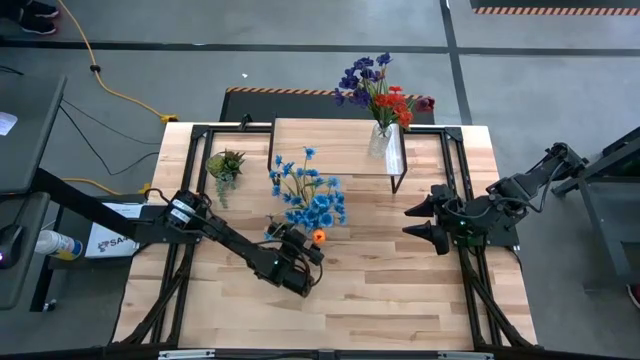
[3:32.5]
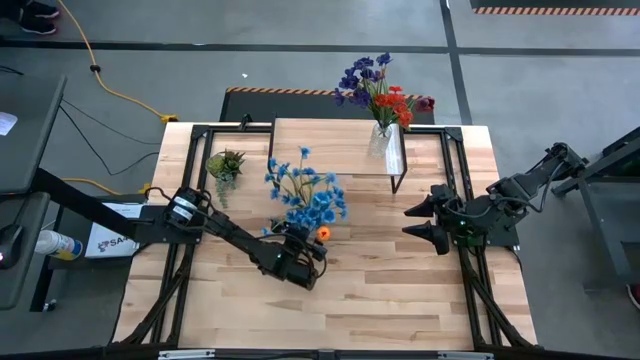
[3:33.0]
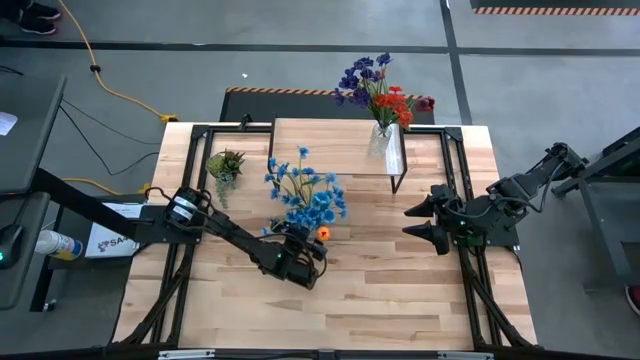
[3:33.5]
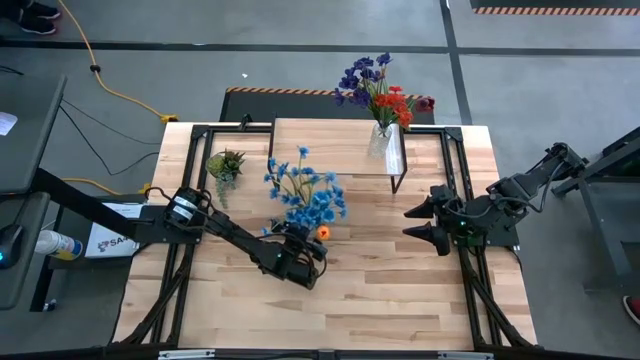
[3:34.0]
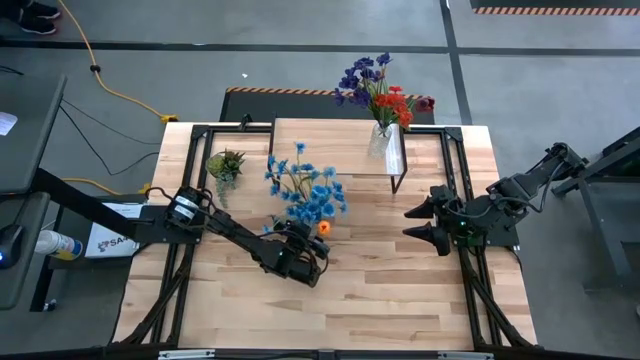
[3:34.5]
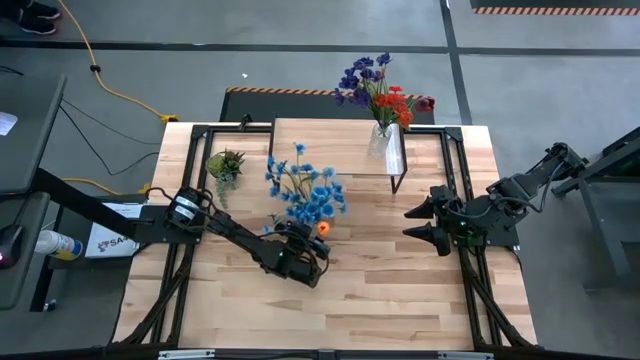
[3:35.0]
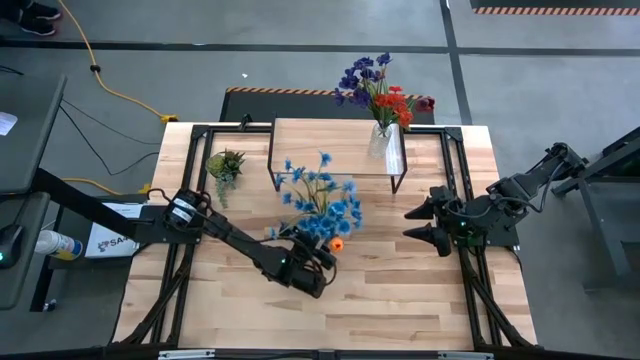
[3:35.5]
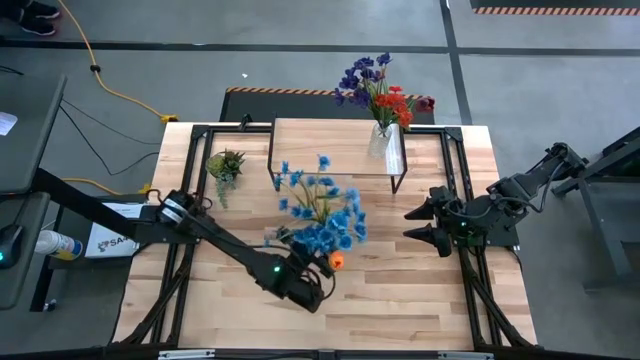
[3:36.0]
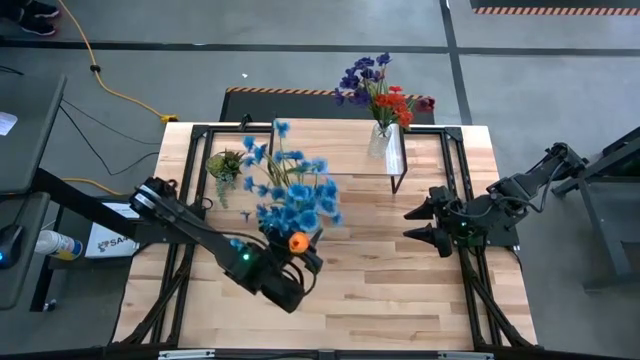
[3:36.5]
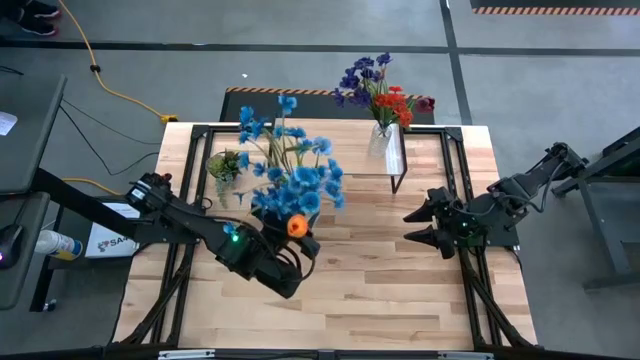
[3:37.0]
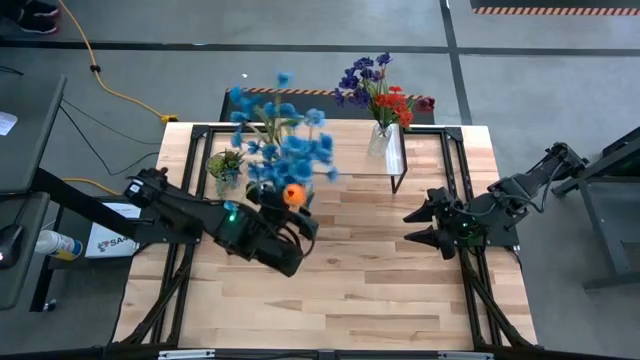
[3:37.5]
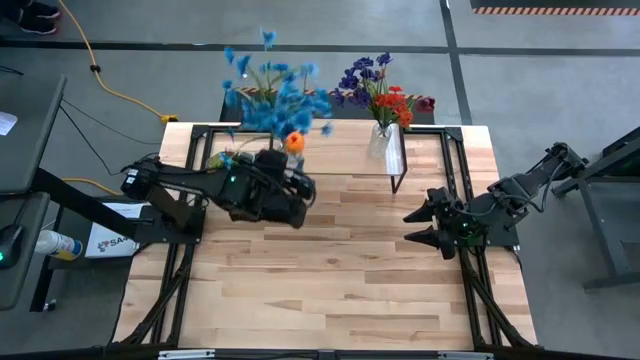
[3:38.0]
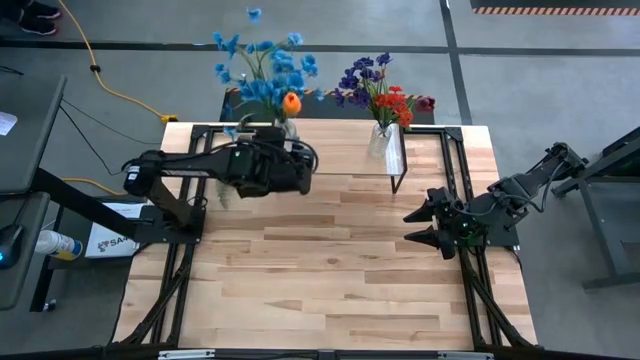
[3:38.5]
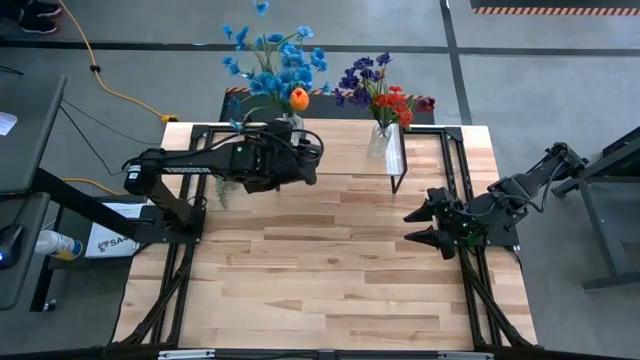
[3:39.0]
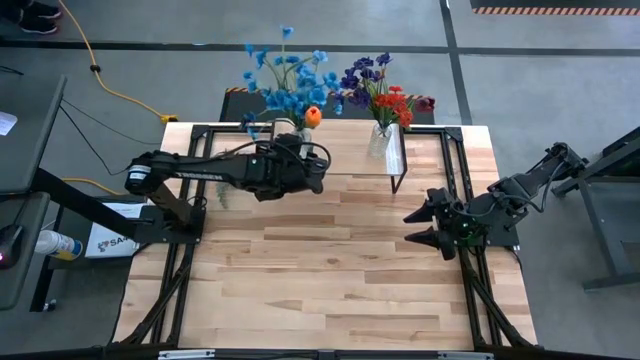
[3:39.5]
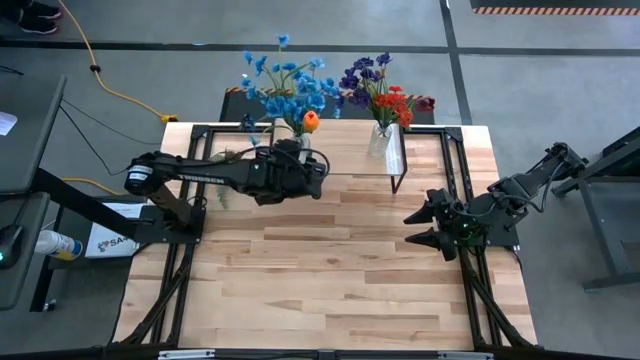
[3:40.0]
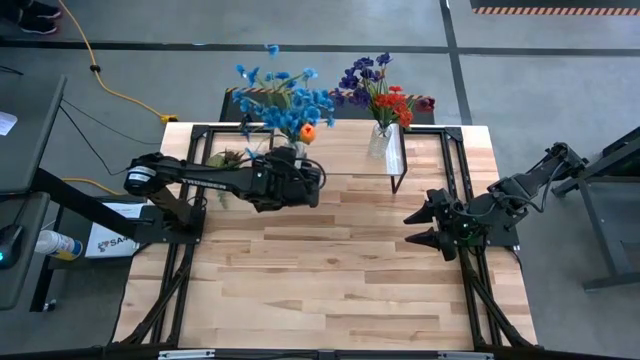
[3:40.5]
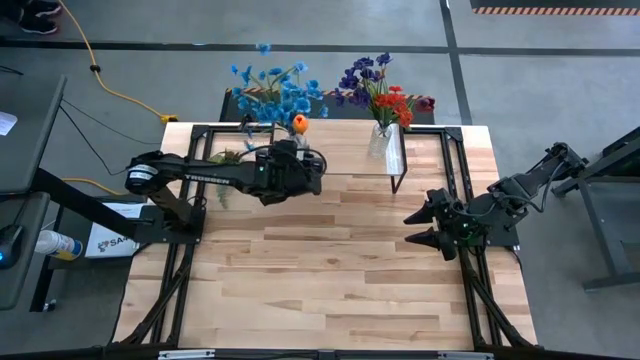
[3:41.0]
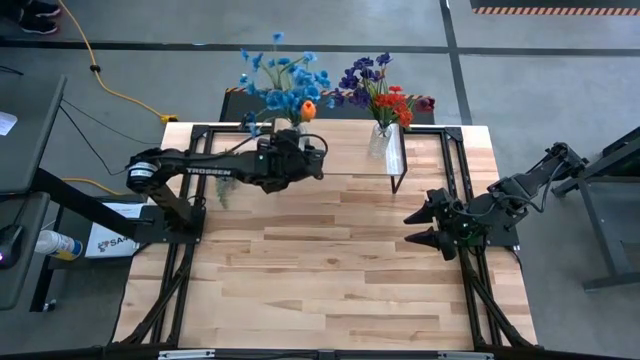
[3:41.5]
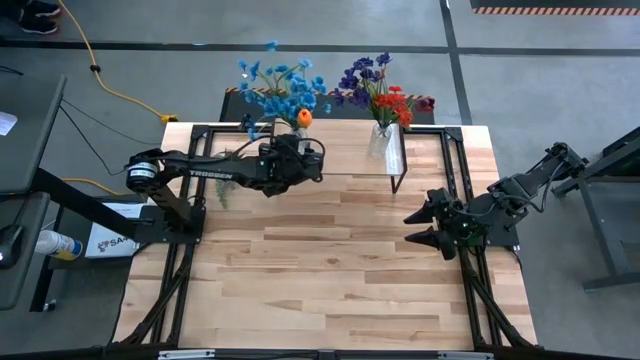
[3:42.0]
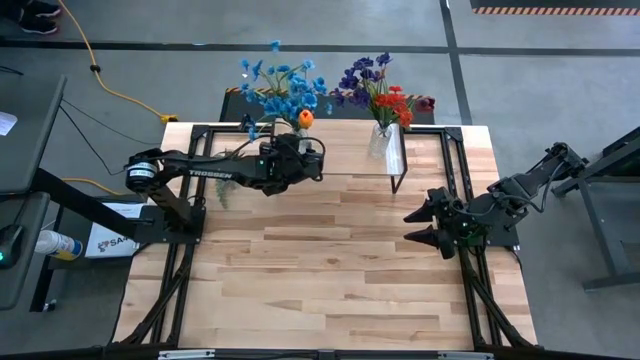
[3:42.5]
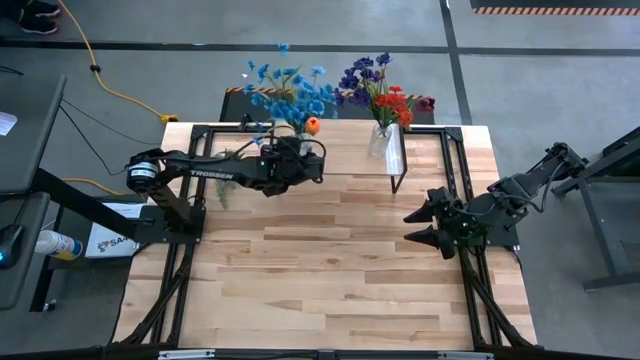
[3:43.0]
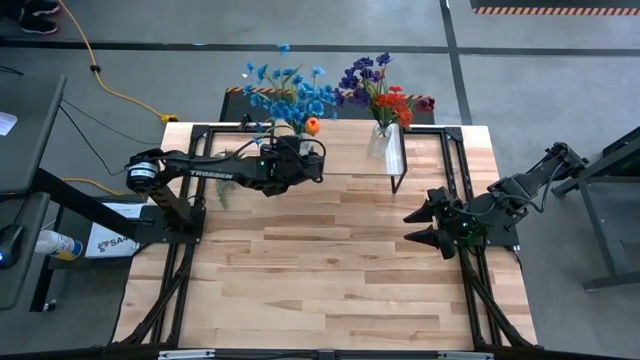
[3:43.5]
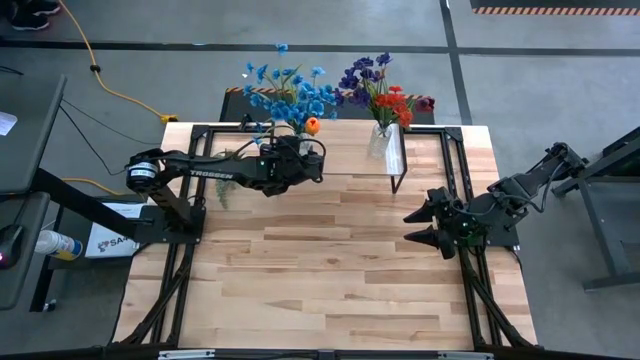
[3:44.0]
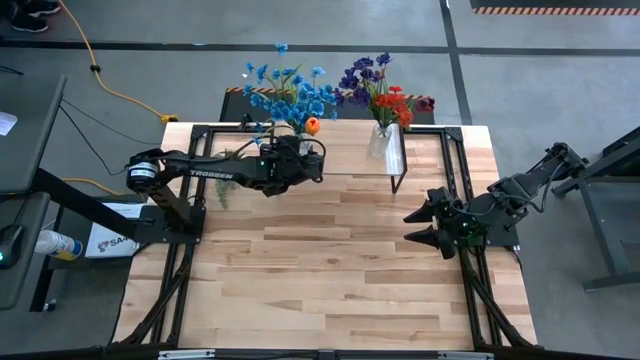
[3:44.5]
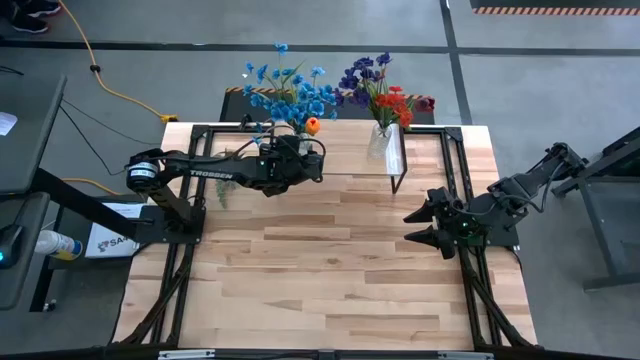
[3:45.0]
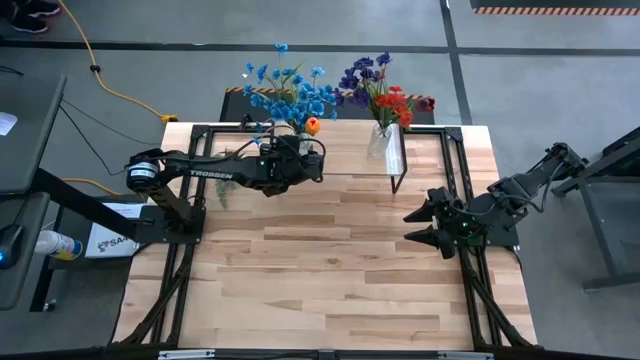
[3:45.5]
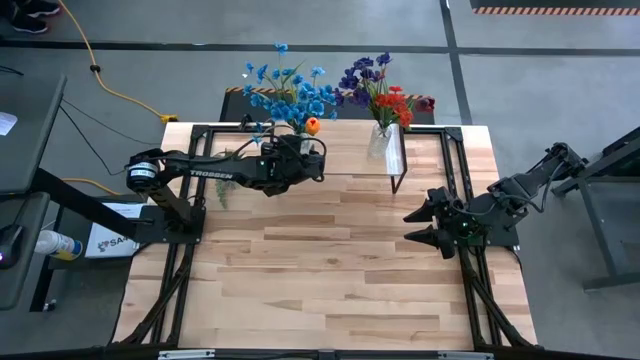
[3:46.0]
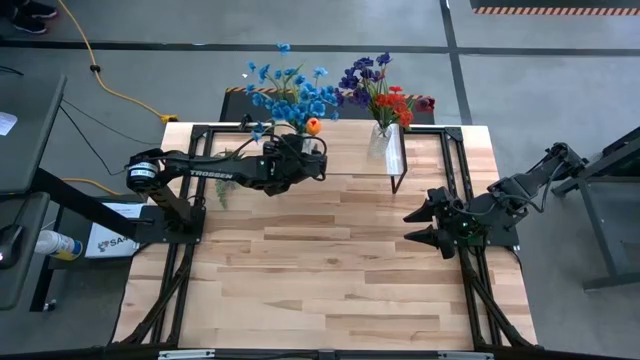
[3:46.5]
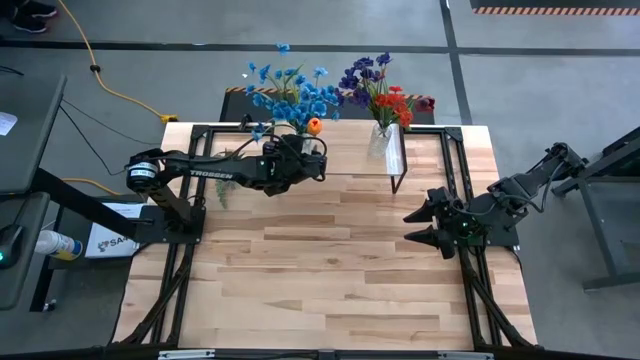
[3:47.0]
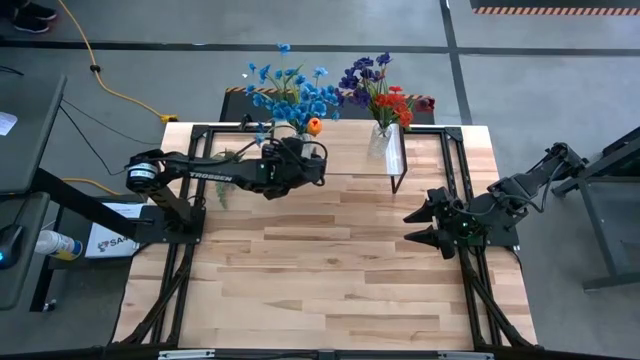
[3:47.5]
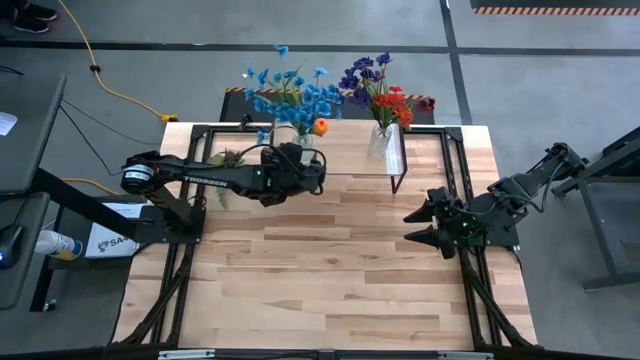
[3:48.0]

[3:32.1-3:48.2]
Task: Pick and place flowers into a vace then onto a shelf
Put the transparent flower vase on the shelf

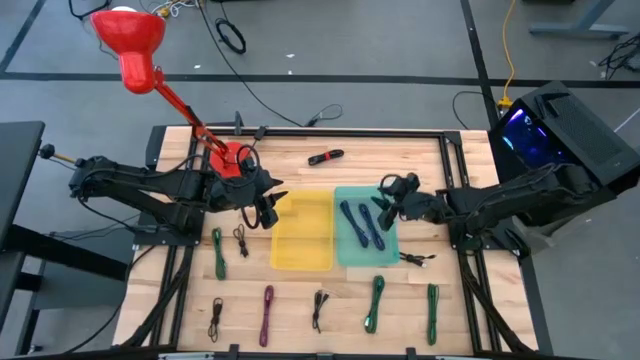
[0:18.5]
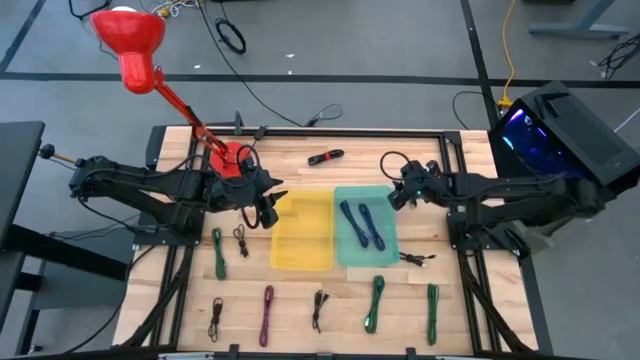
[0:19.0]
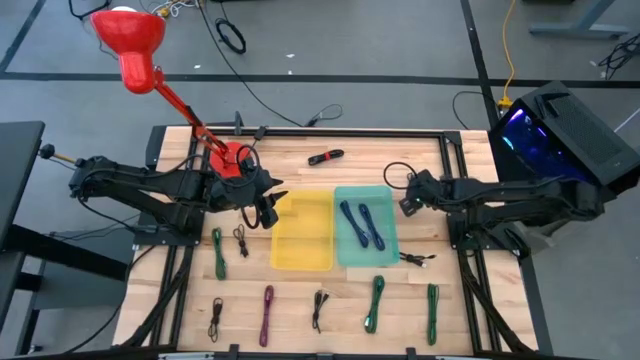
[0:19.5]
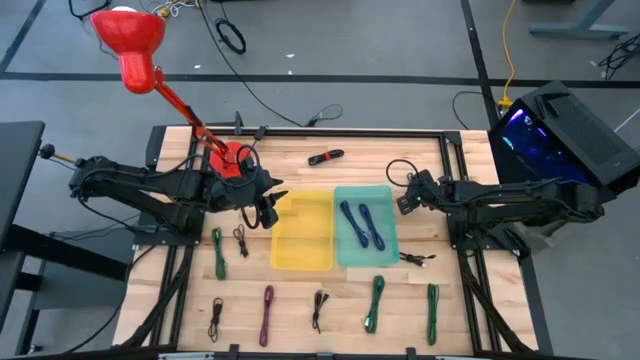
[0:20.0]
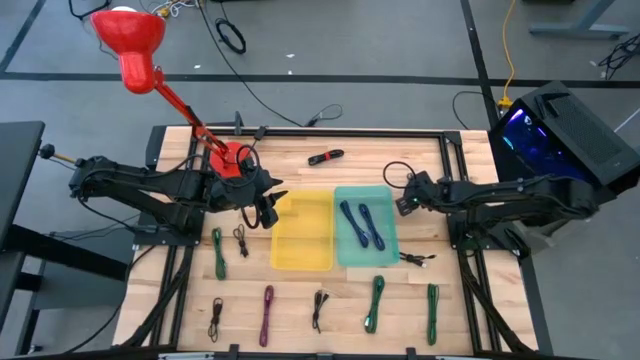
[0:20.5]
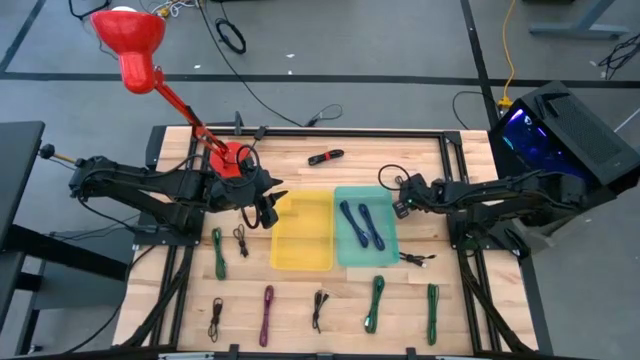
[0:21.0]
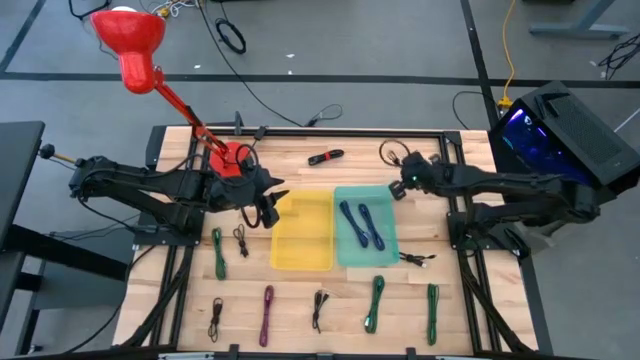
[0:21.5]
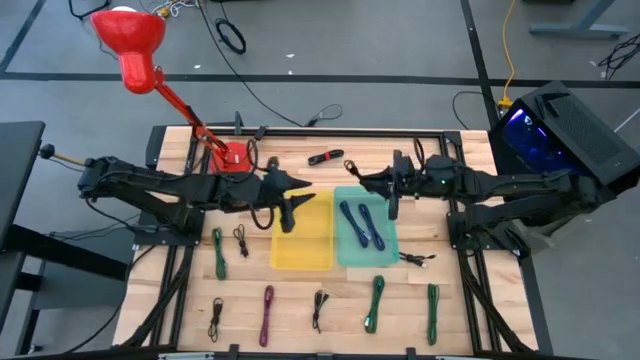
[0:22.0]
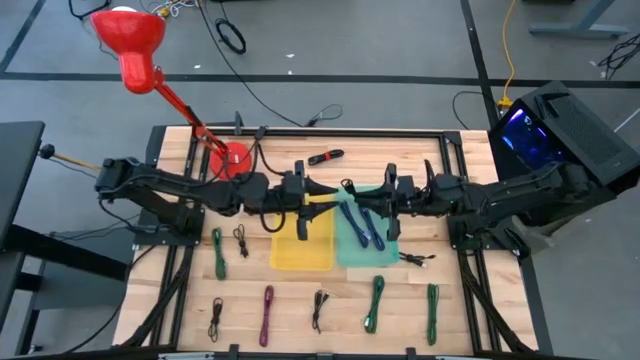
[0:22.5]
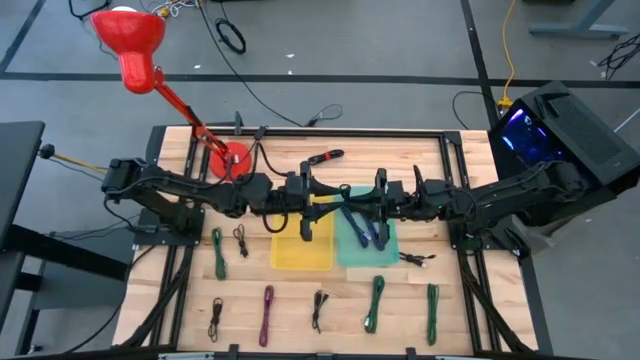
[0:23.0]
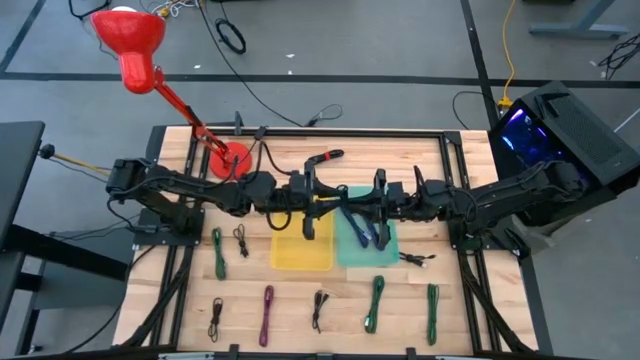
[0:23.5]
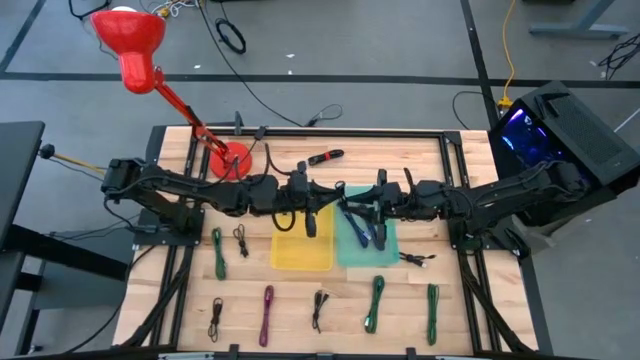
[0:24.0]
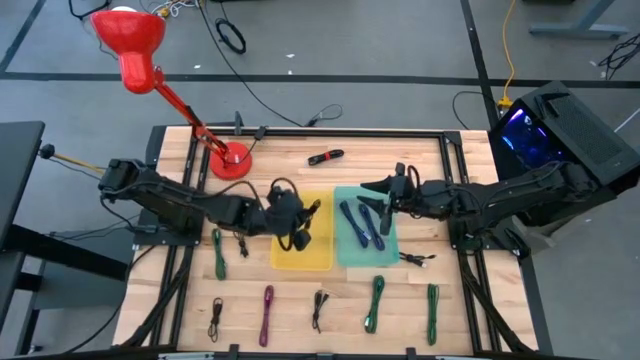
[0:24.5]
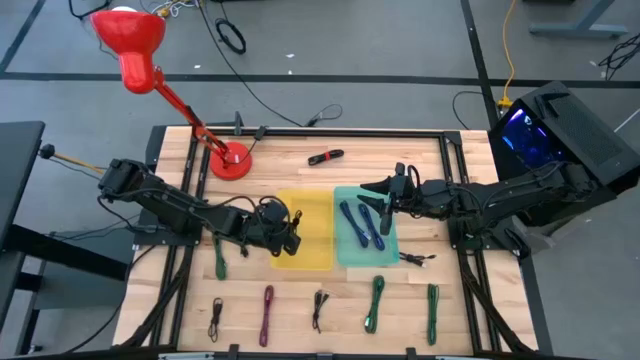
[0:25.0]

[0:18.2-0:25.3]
Task: Pick & Place USB Port
Put the black charger cable into the yellow bin
